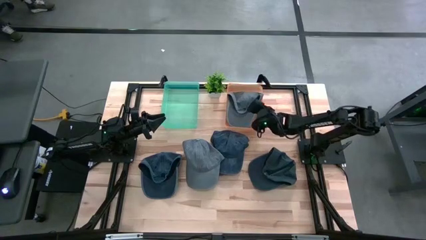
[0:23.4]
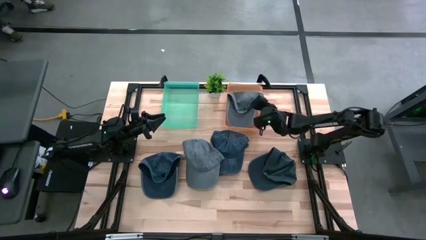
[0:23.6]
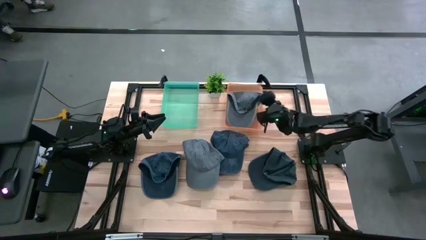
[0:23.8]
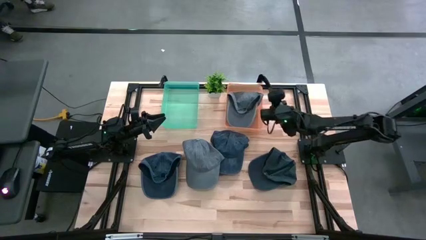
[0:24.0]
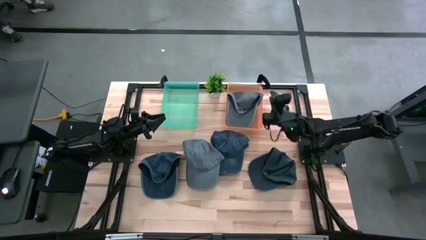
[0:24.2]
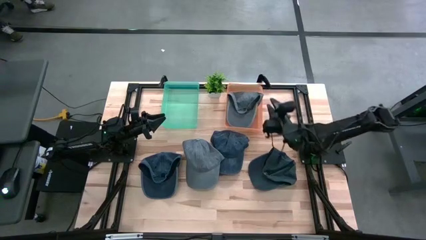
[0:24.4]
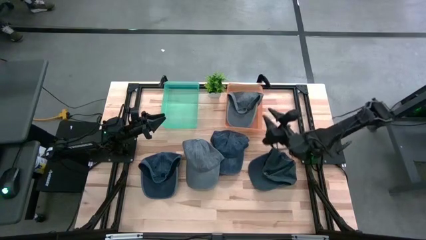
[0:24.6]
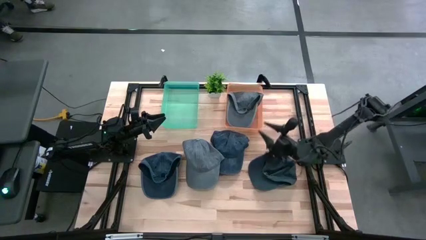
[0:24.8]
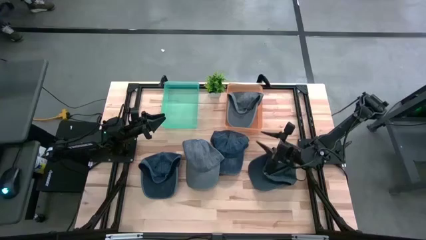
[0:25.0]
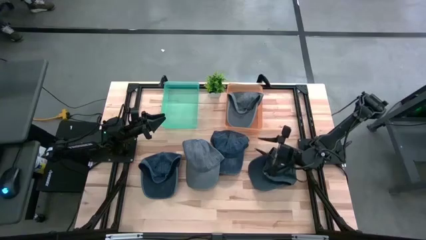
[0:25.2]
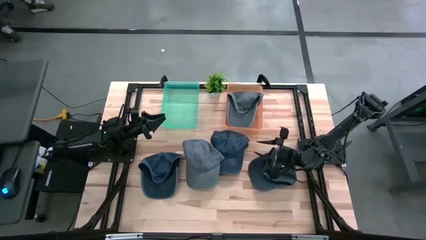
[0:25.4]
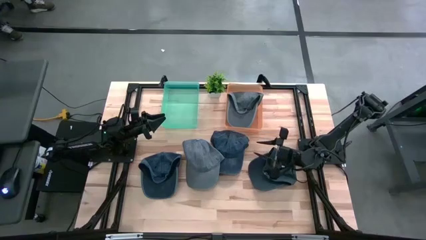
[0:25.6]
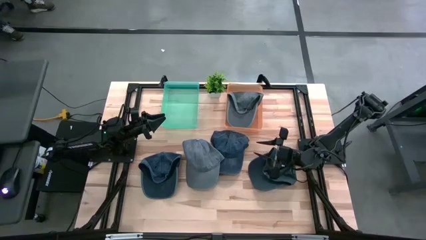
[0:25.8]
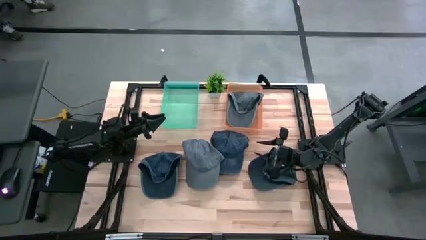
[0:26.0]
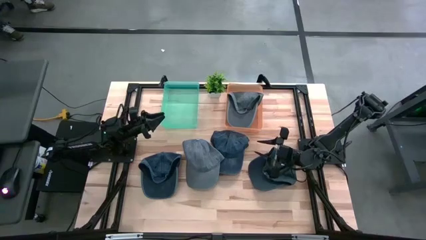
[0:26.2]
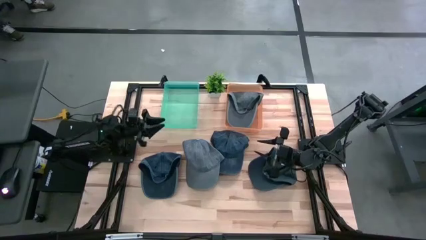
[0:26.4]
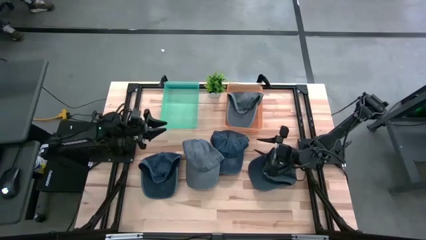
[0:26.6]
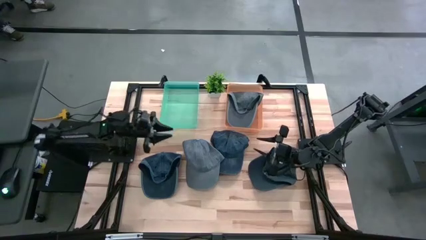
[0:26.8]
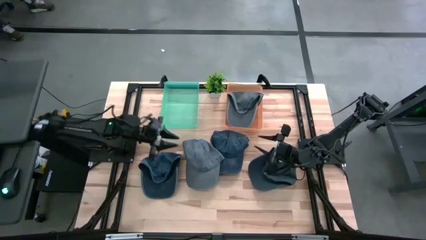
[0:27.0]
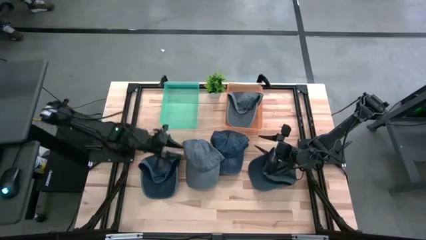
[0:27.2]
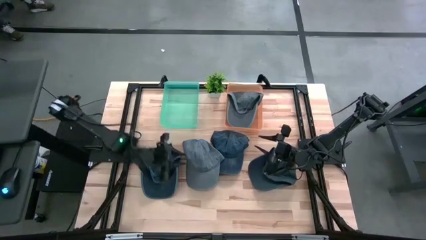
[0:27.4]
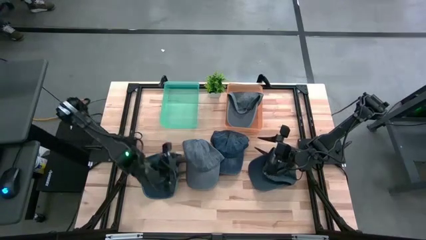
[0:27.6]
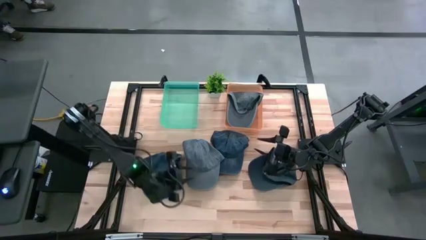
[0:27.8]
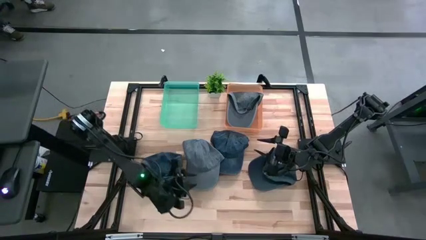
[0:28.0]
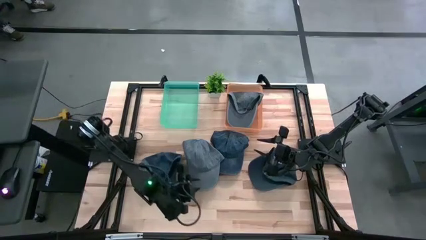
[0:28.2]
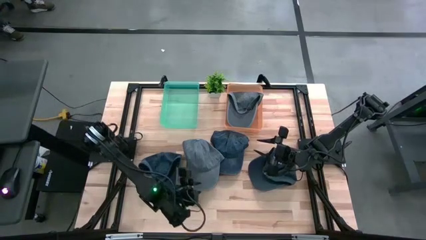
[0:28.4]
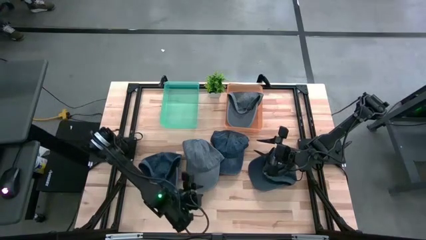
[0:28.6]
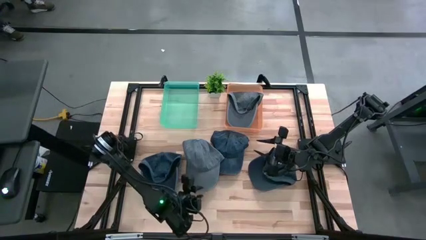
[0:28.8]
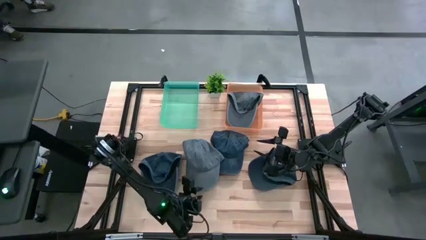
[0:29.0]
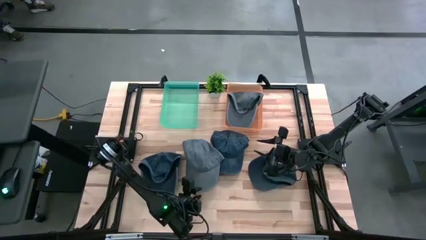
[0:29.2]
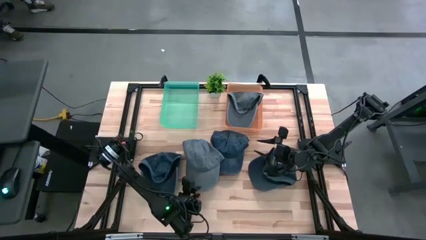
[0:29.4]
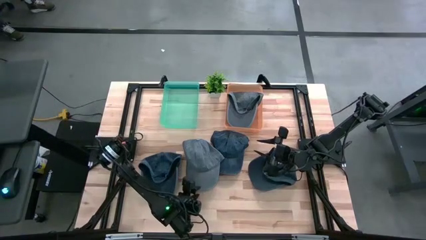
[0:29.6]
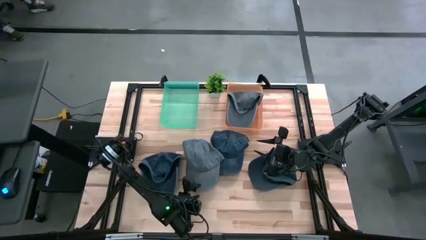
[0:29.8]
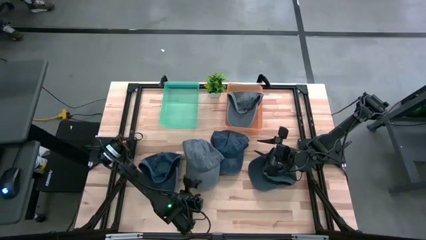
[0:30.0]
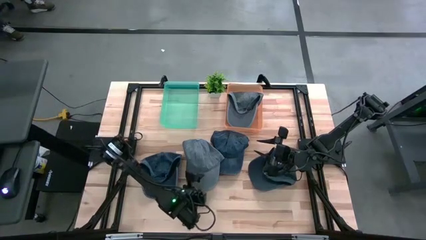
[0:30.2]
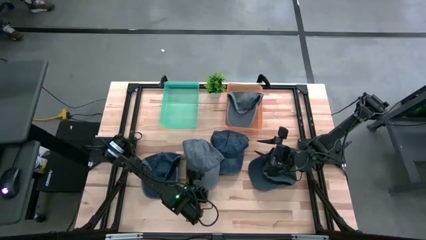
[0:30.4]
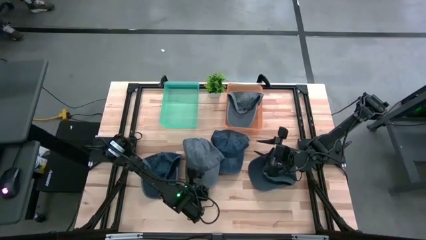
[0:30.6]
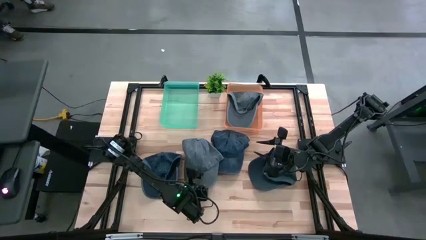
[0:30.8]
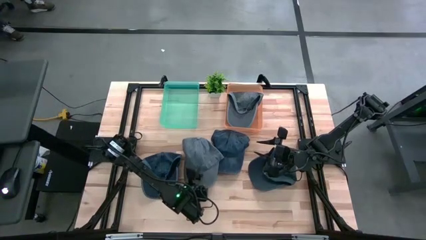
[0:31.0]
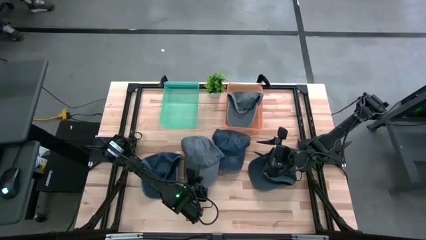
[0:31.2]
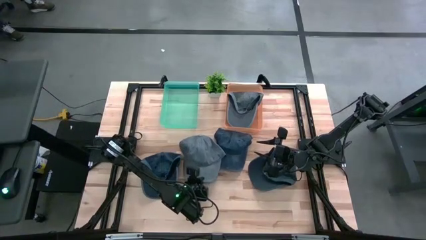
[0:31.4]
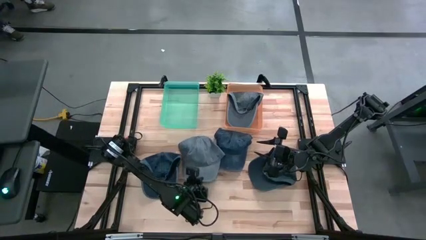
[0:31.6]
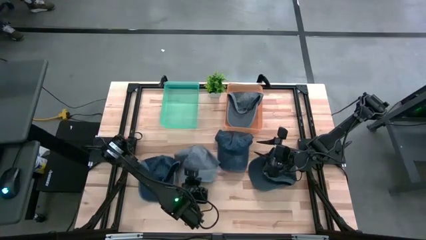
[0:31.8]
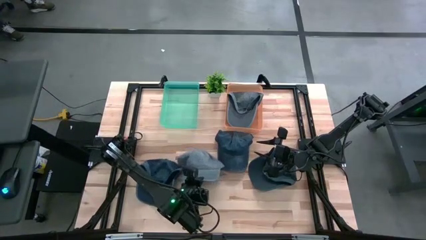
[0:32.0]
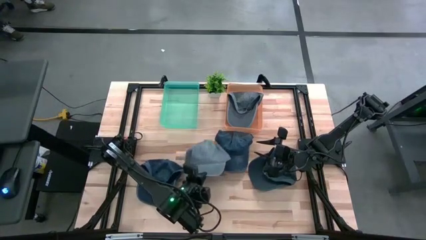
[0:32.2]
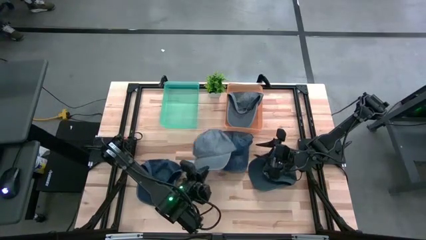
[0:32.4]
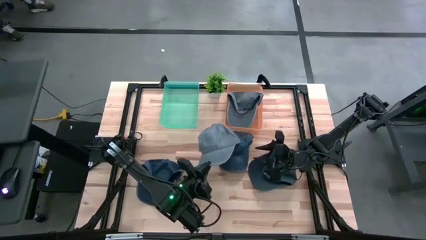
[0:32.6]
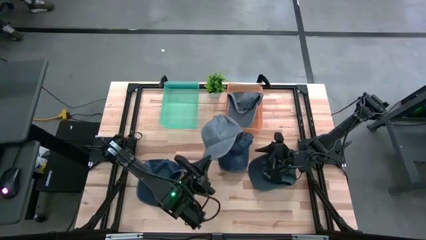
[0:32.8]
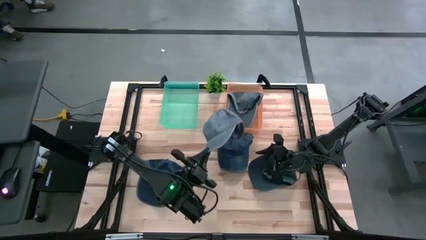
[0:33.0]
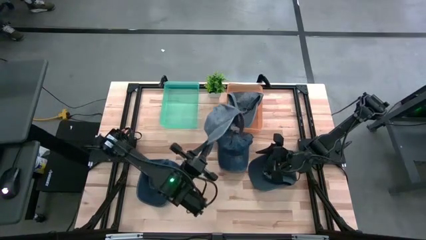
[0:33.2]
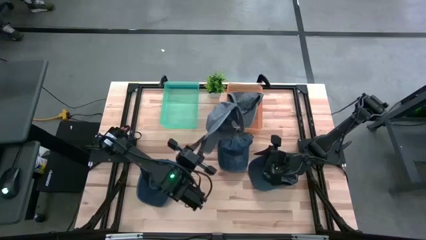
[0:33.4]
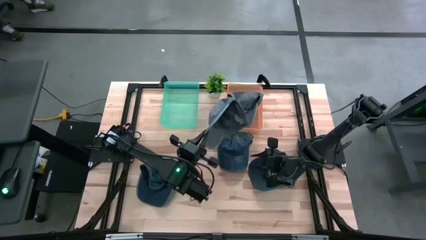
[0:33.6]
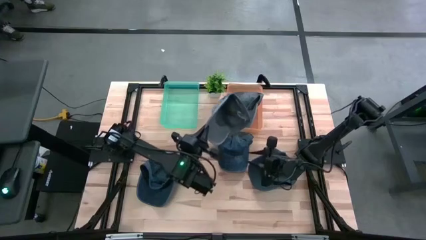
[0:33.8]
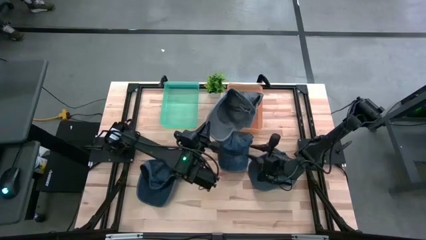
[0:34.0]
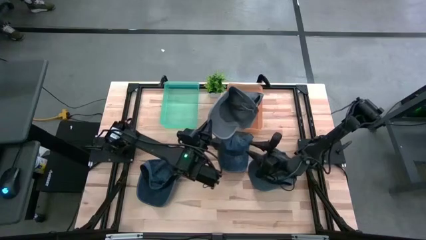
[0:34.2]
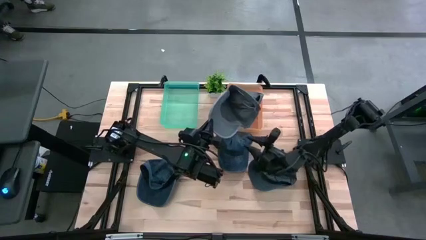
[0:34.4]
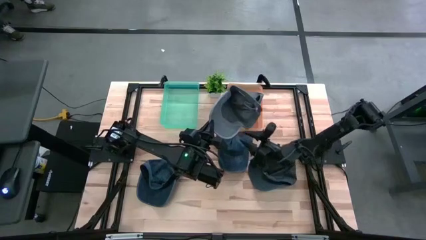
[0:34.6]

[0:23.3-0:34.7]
Task: Pick & Place hat
Put the light gray cap into the orange bin

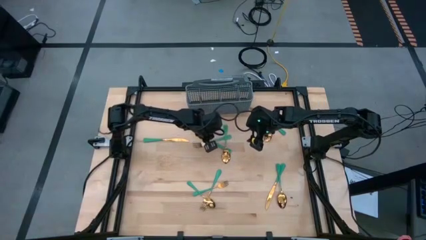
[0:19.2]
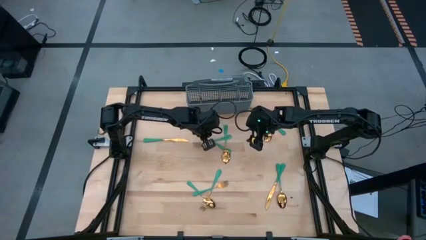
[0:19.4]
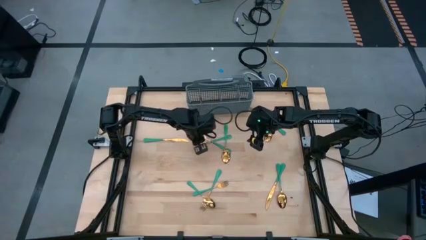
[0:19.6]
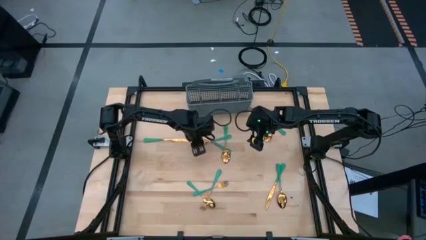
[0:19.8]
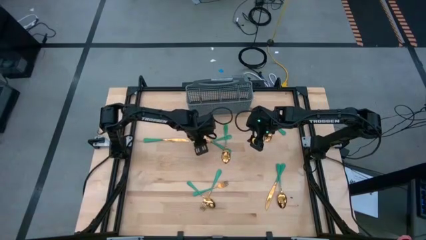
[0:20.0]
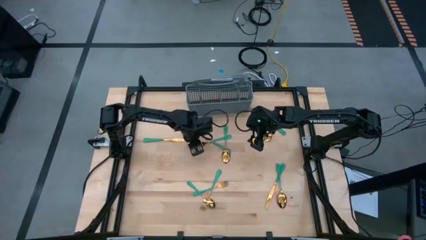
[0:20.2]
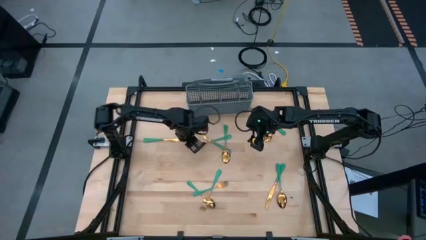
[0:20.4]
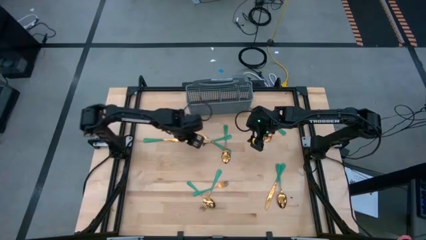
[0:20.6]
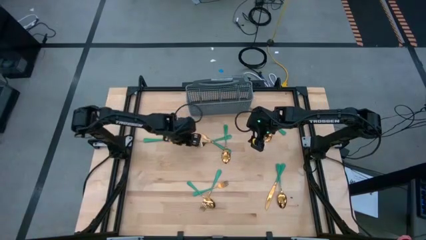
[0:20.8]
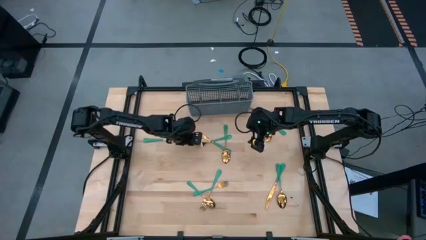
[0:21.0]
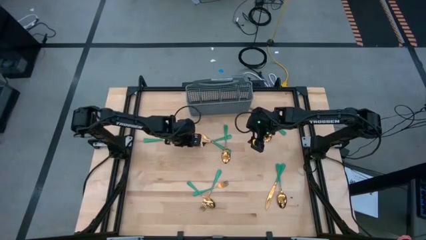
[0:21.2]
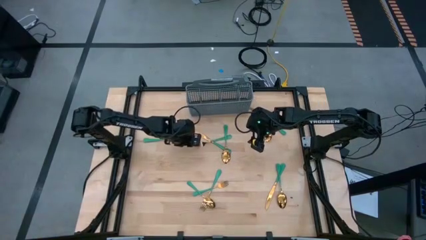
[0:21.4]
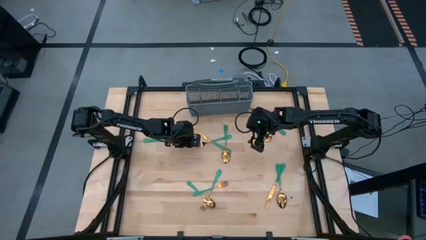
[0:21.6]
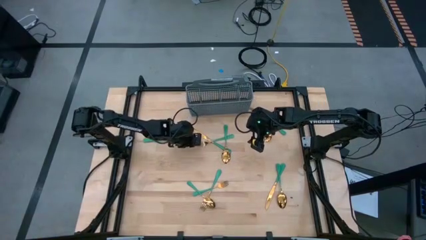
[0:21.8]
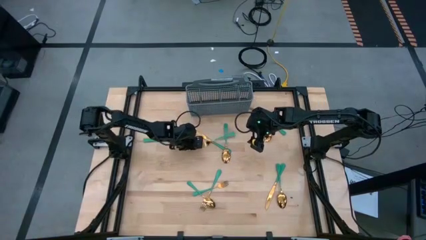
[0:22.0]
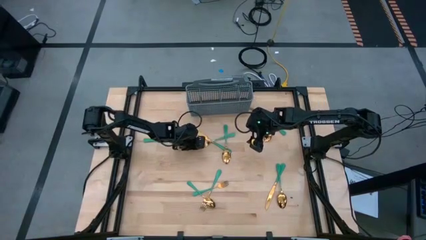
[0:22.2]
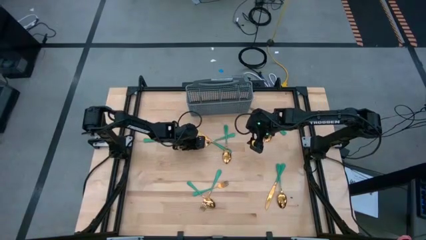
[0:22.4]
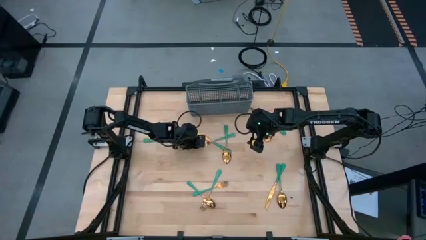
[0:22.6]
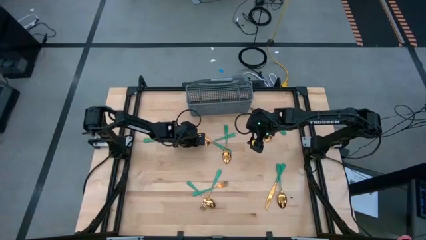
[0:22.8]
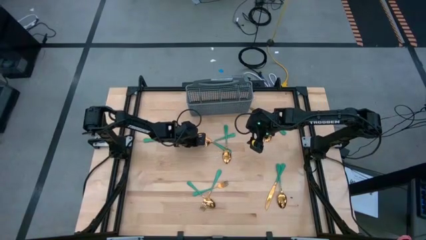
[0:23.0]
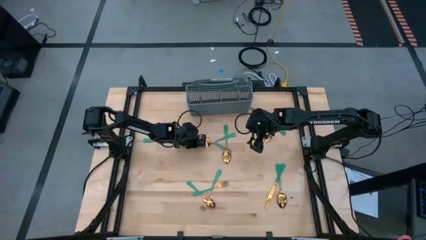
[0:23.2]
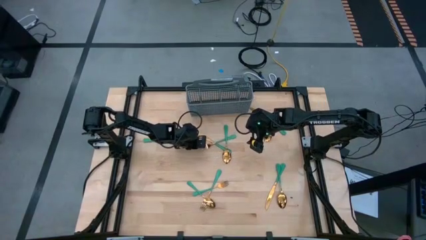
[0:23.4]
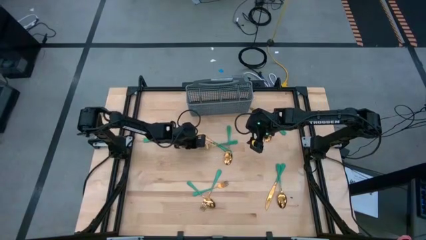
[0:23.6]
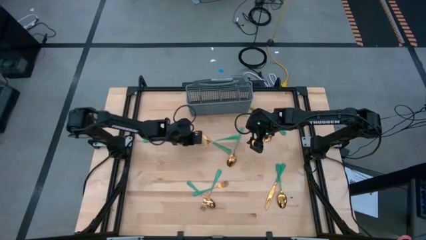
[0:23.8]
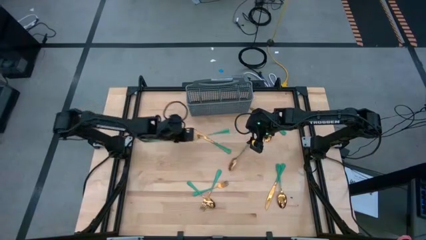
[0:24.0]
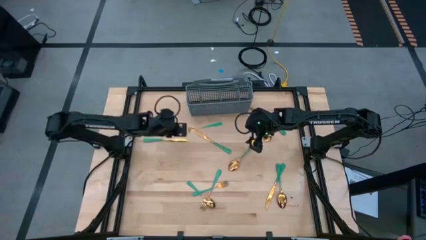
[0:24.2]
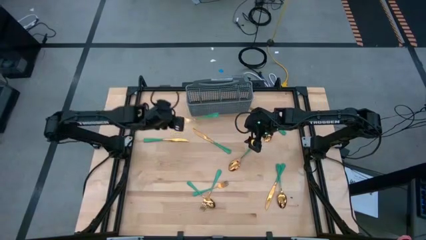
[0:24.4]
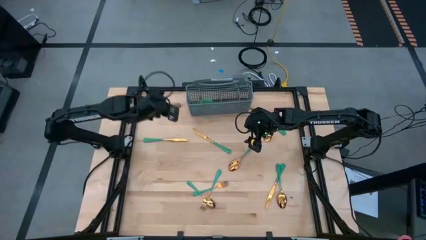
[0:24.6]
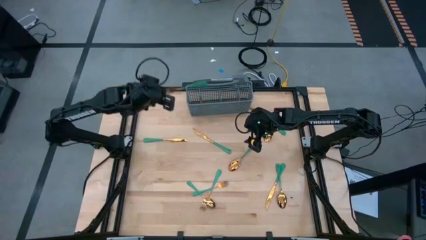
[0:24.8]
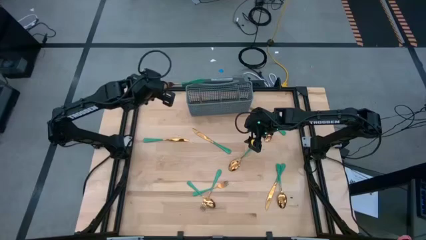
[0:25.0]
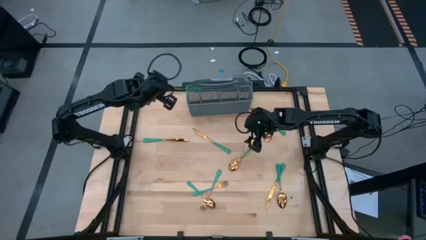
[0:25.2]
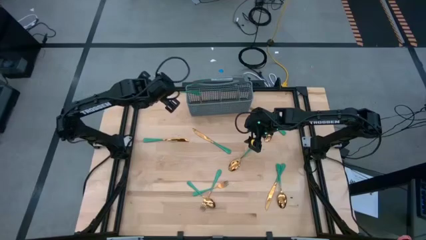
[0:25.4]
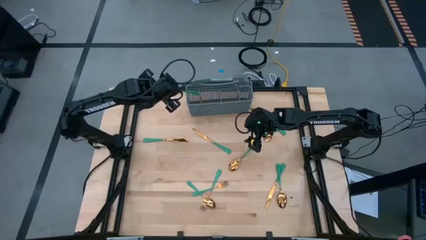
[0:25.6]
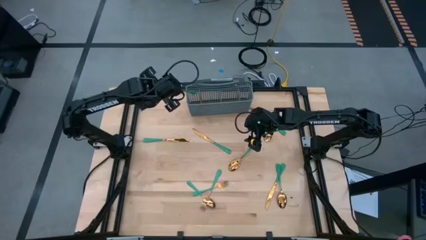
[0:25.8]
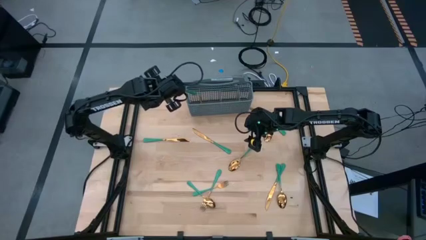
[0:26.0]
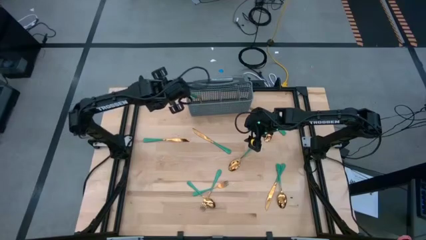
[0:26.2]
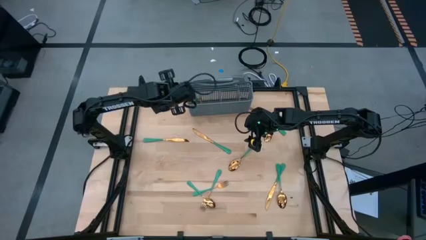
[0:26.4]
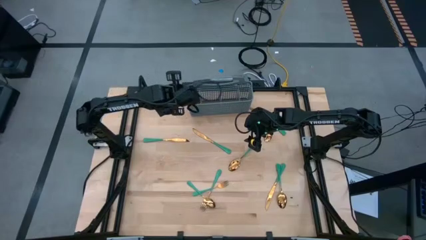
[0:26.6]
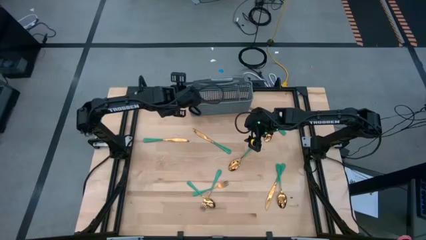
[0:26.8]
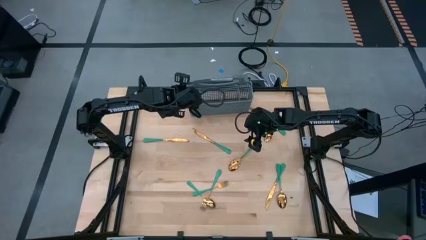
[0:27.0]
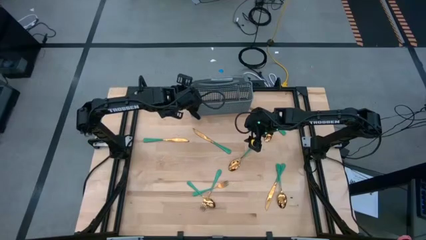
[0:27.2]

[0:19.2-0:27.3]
Task: Sort silverware
Put the gold fork into the left section of the gray utensil holder
